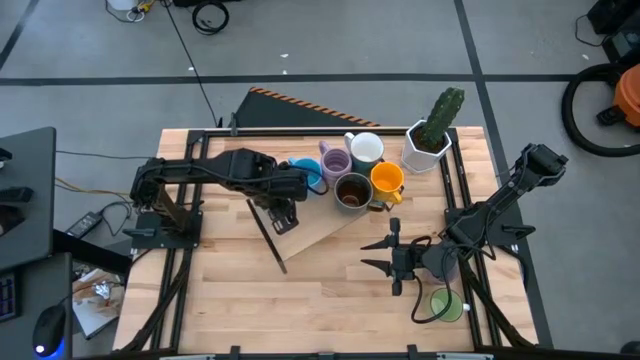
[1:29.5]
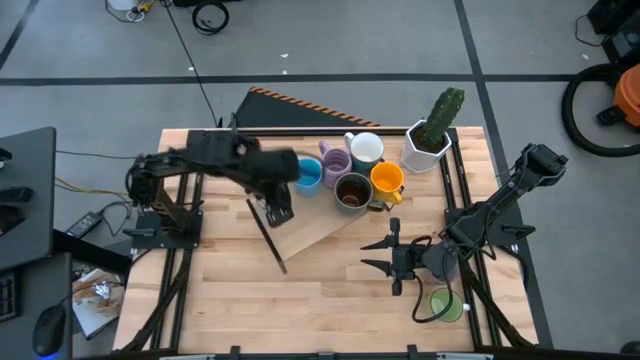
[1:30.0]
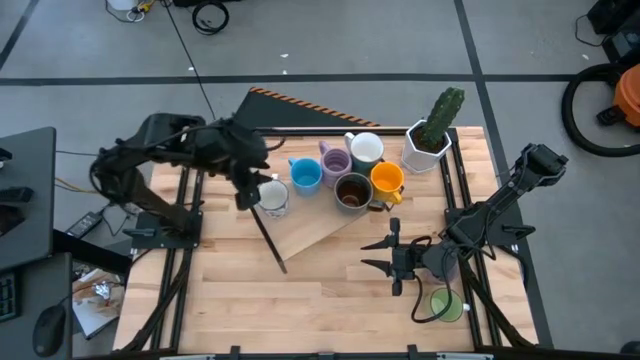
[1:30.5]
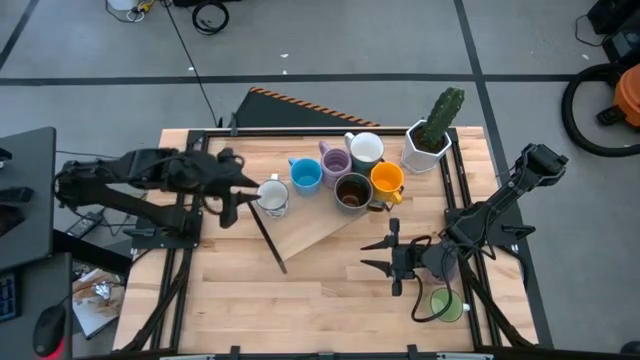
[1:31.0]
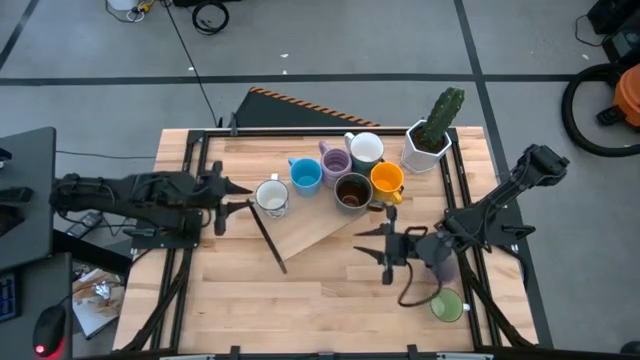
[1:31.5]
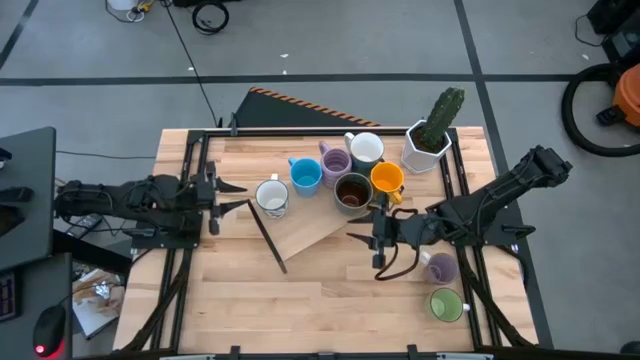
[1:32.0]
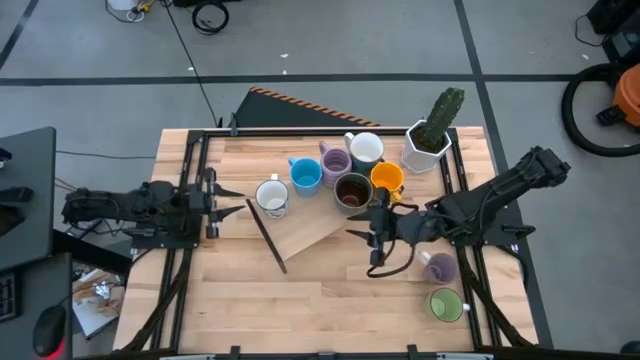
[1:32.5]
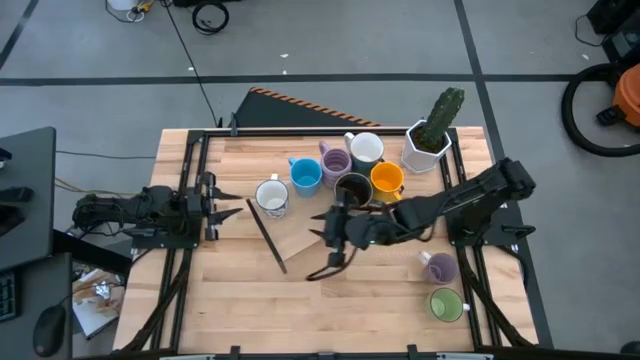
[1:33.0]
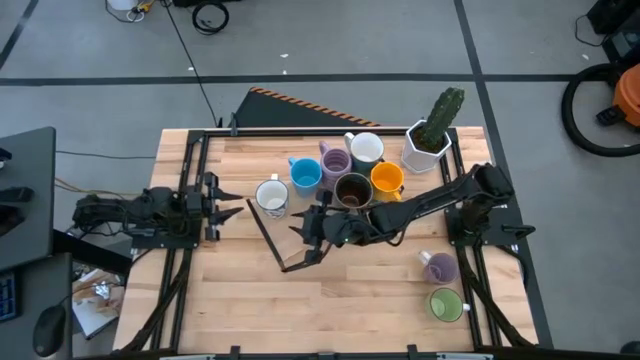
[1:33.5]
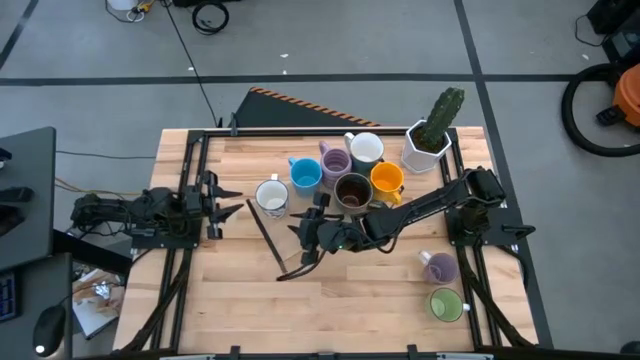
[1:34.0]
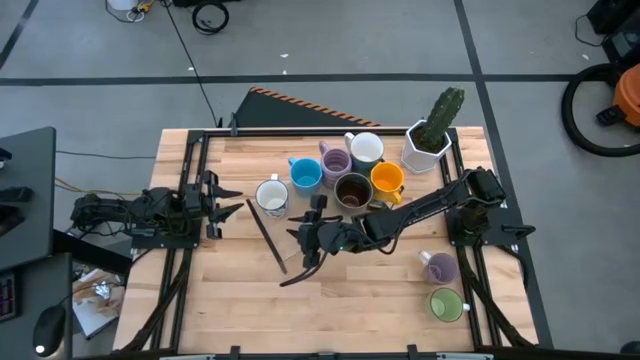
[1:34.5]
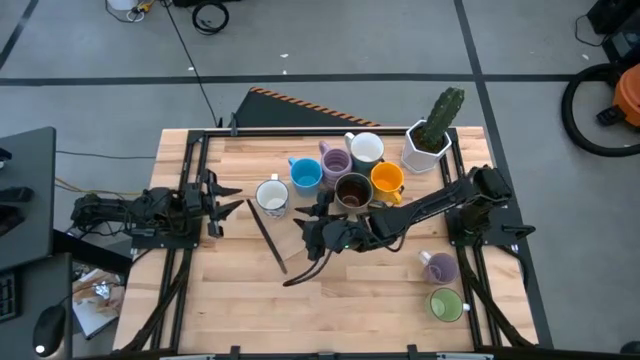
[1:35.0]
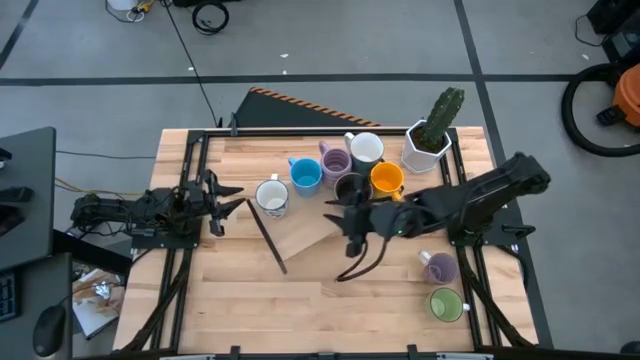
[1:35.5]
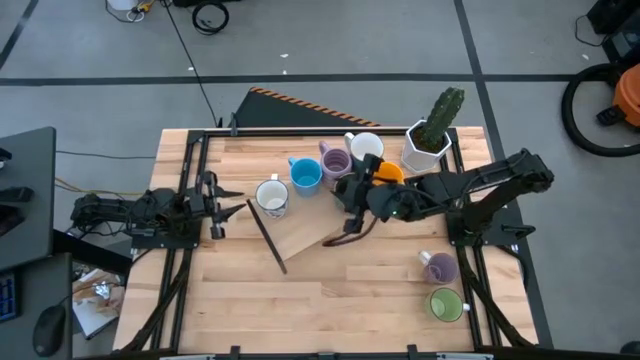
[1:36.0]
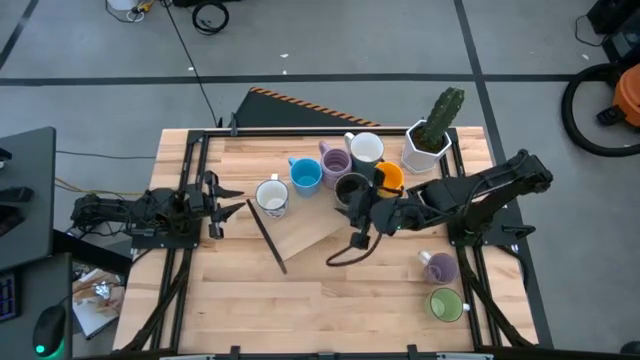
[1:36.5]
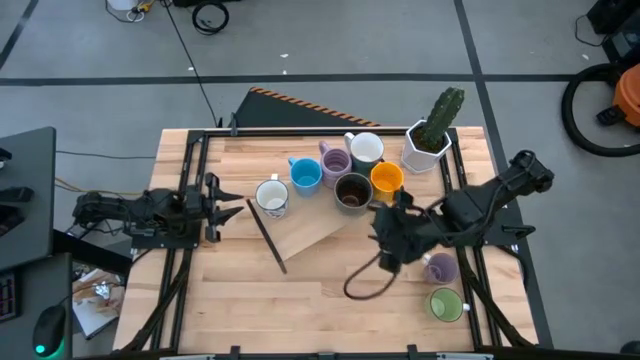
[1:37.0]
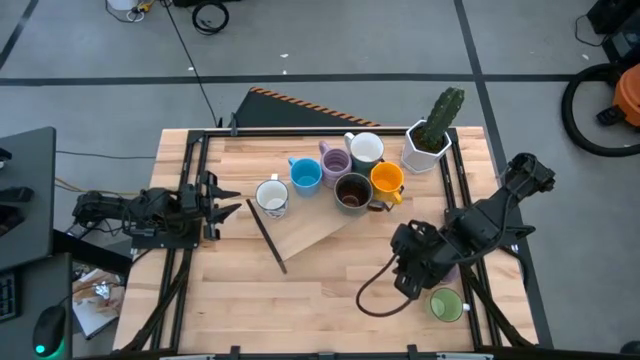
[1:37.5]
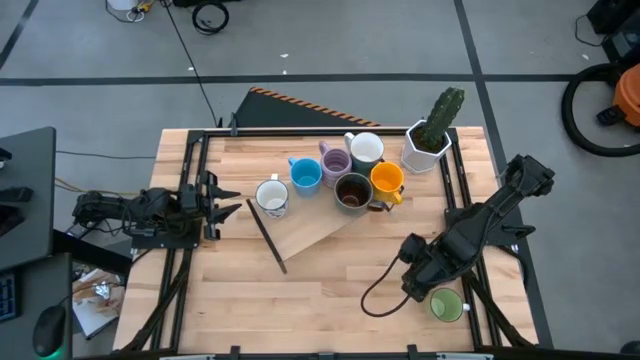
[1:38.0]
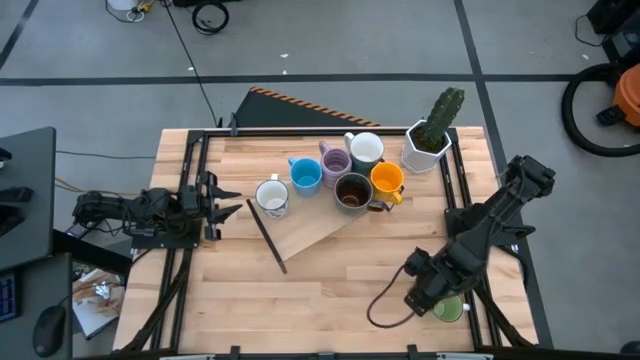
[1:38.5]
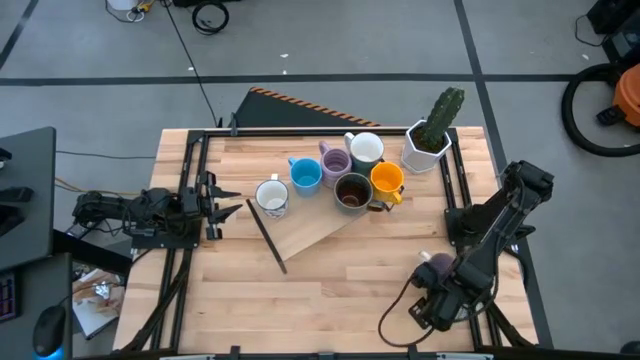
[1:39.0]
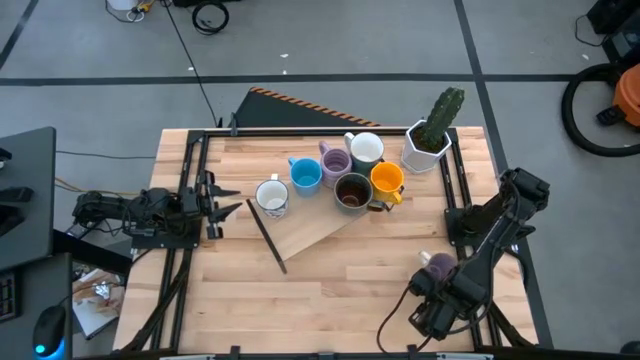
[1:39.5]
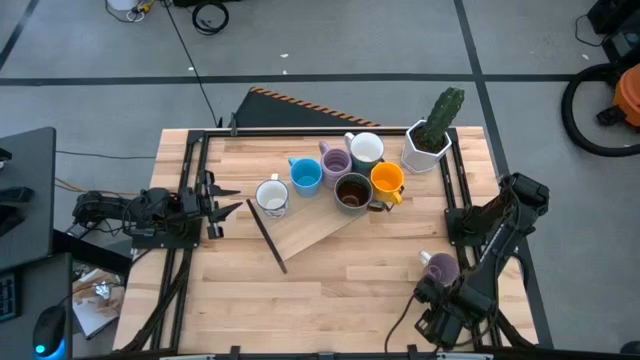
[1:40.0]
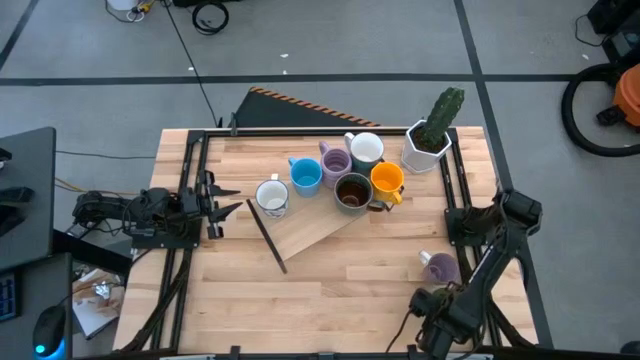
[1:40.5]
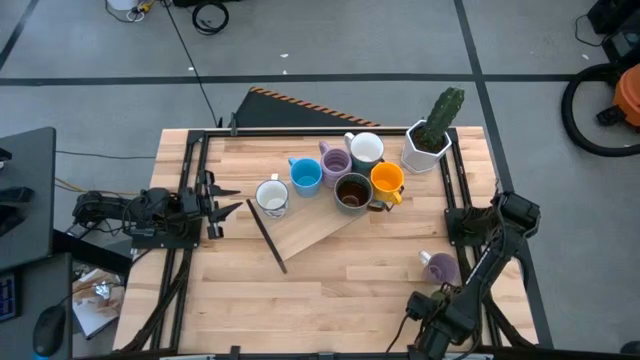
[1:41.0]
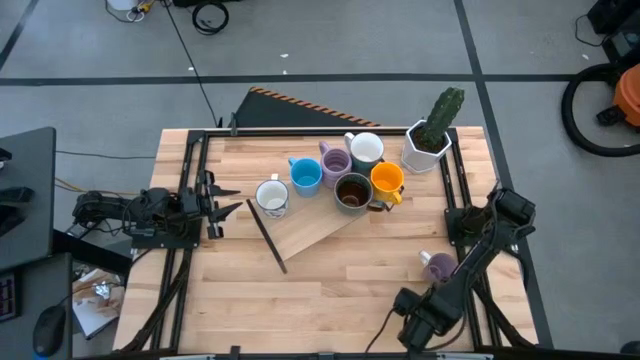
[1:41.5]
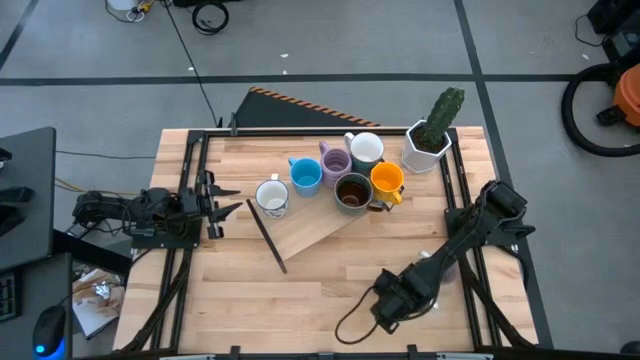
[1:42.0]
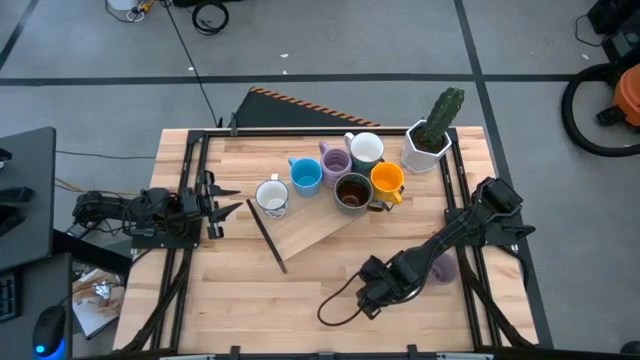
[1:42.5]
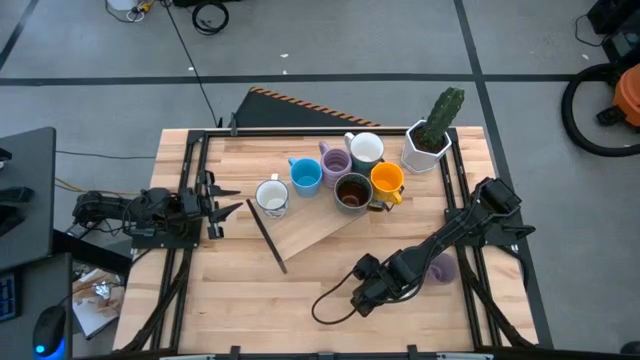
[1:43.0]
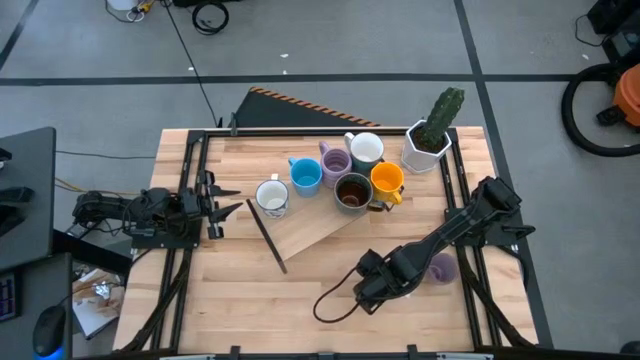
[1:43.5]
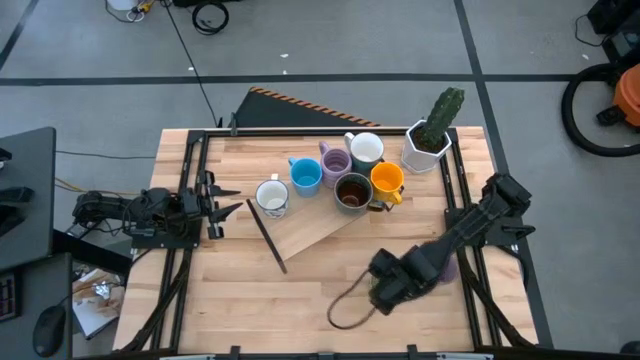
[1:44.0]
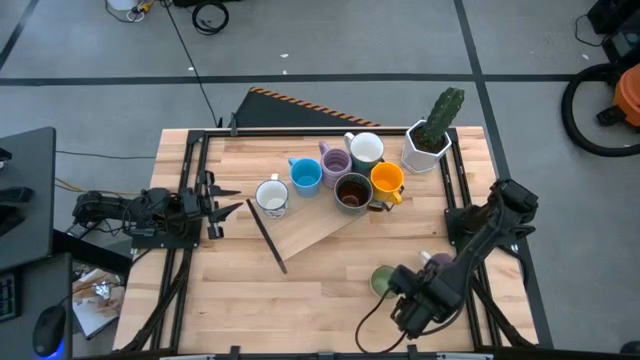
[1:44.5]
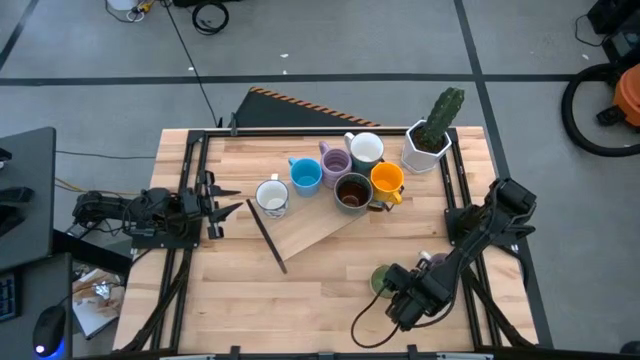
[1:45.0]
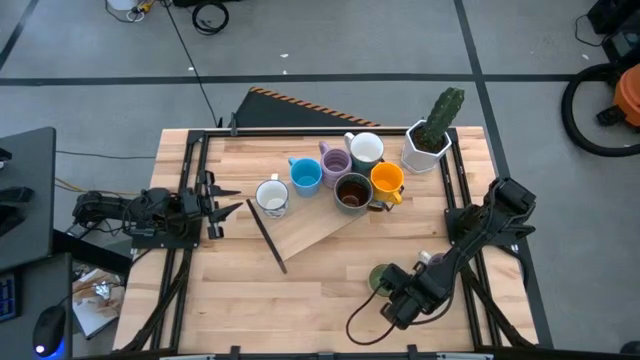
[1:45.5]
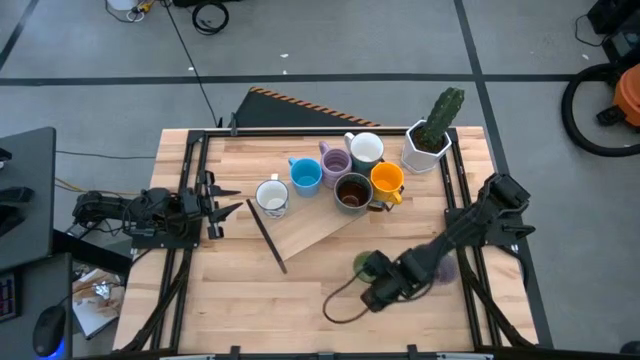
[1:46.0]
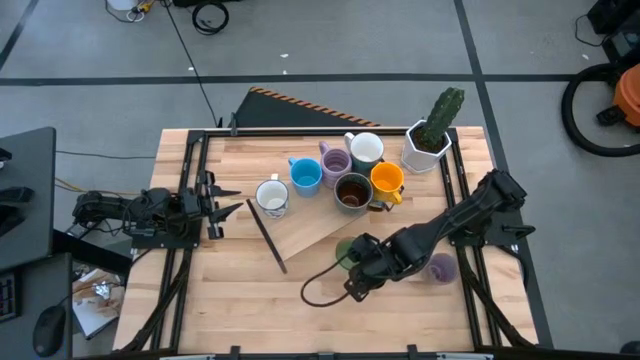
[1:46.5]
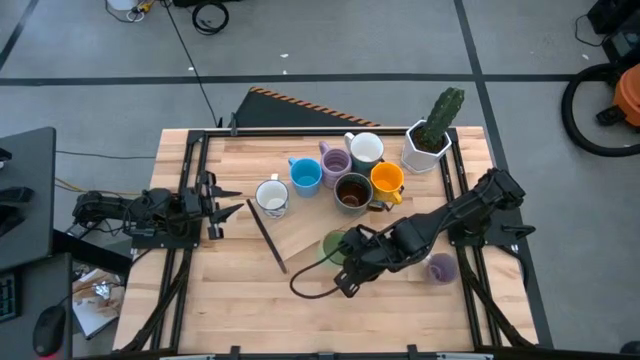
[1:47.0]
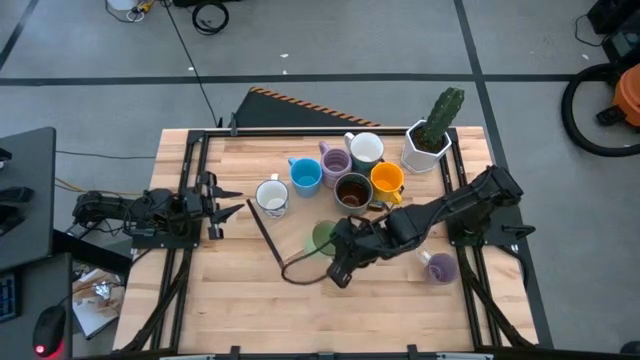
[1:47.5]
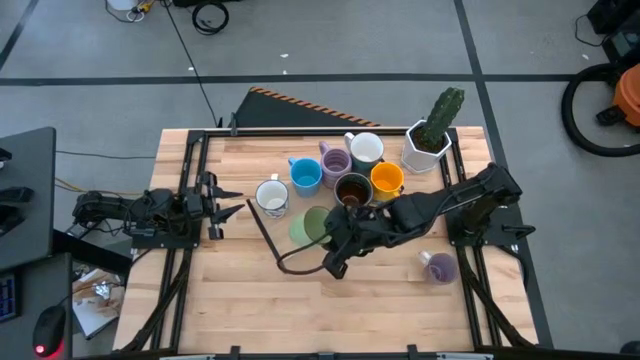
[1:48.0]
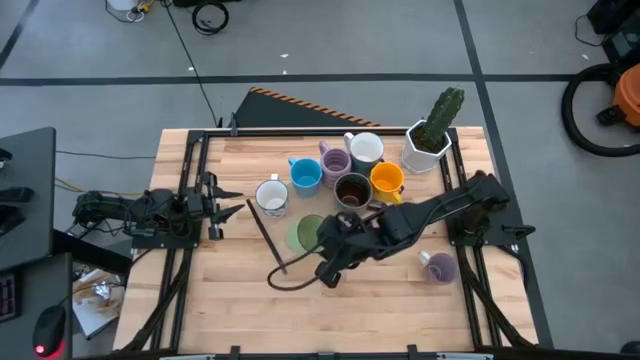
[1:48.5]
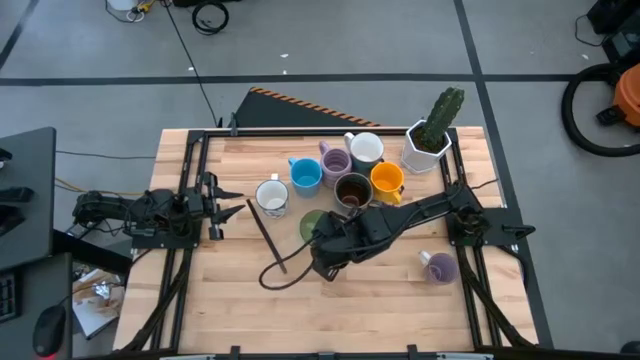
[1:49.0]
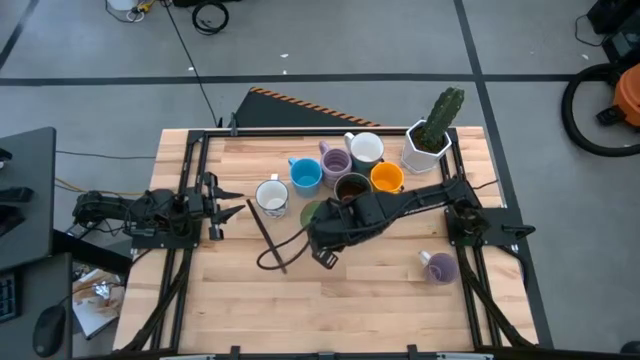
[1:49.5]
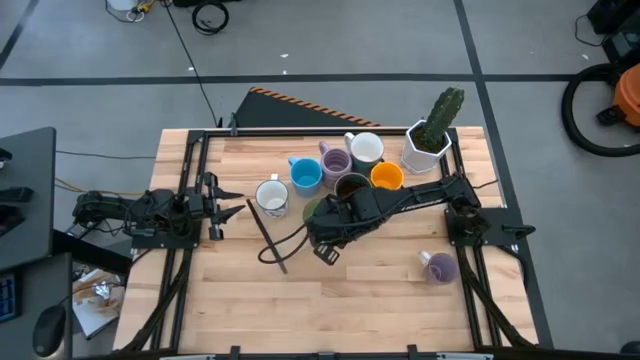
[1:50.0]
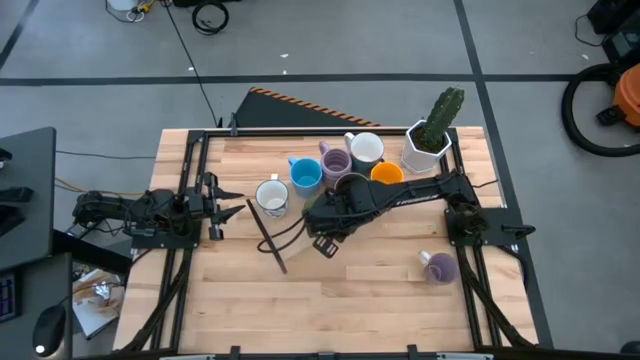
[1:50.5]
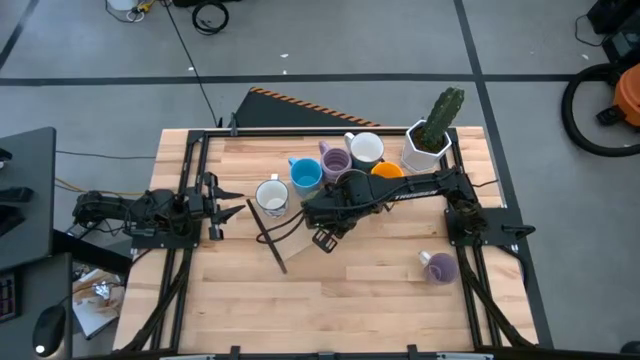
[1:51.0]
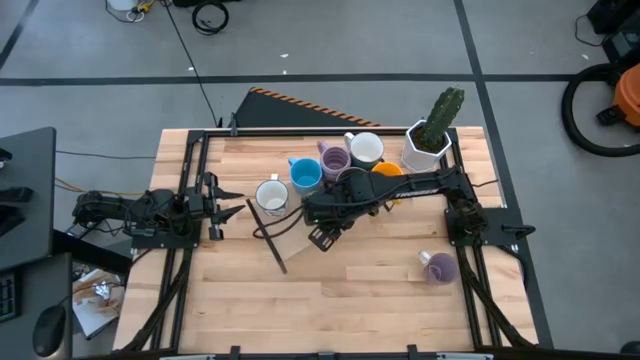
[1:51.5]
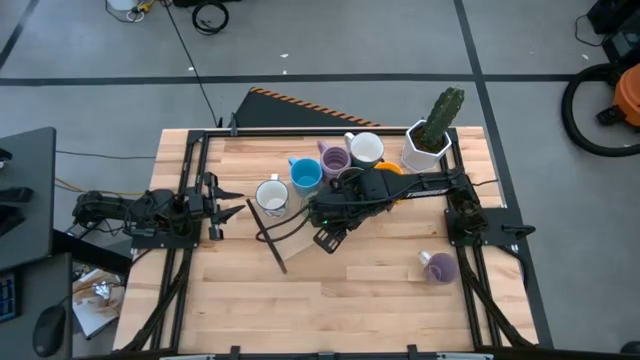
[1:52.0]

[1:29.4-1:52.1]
Task: Place coffee mugs
Put the green mug on the shelf
